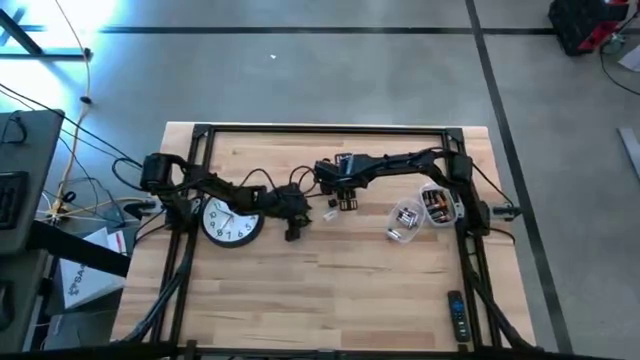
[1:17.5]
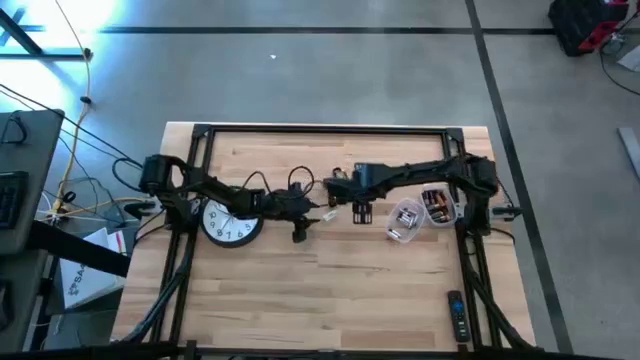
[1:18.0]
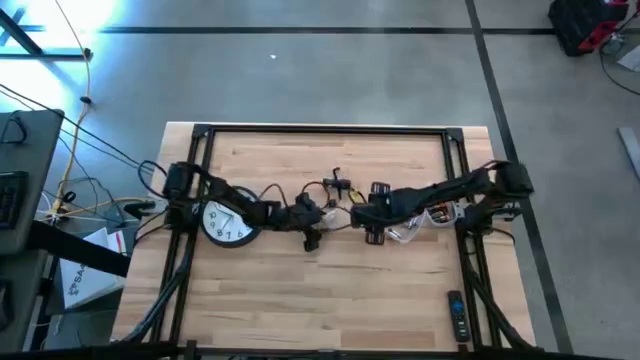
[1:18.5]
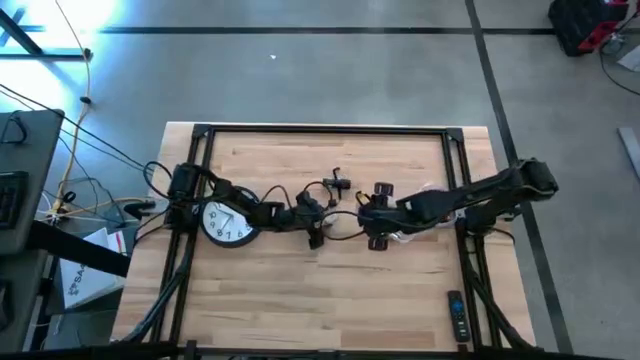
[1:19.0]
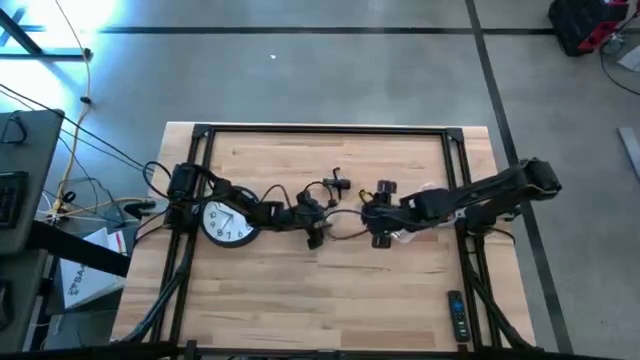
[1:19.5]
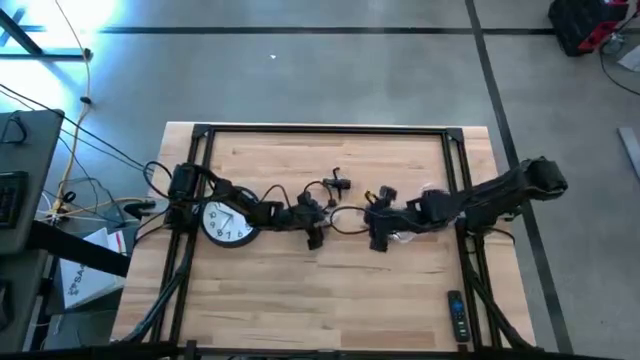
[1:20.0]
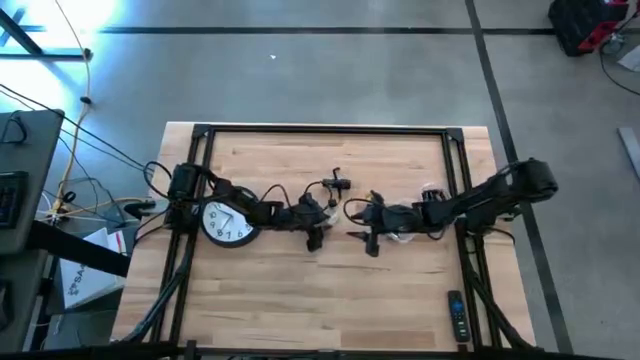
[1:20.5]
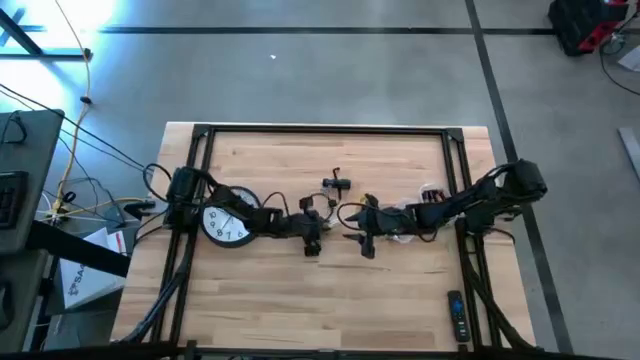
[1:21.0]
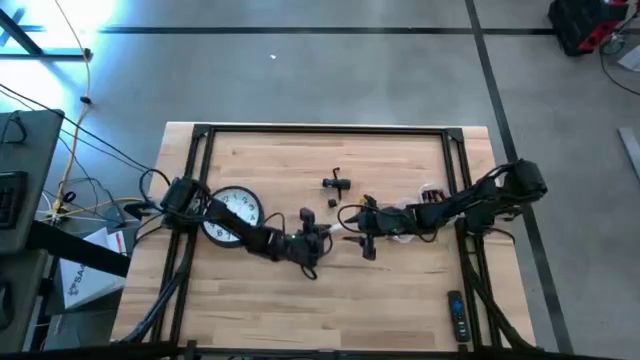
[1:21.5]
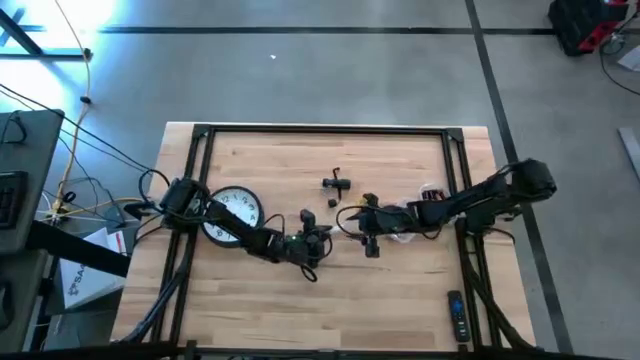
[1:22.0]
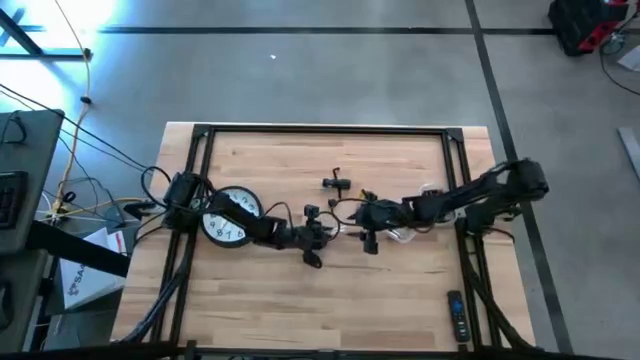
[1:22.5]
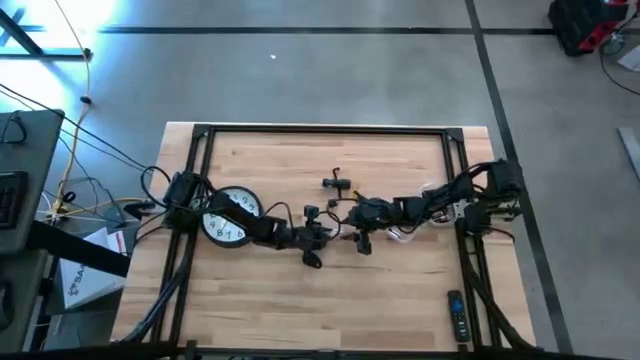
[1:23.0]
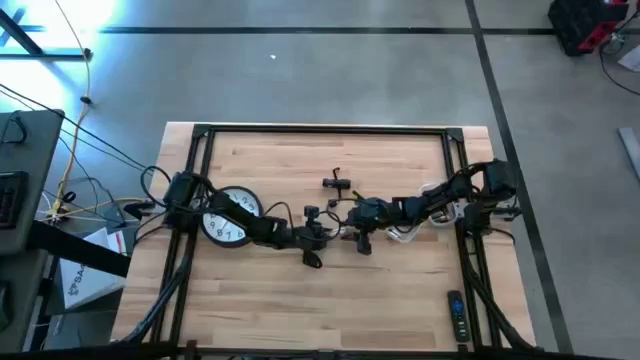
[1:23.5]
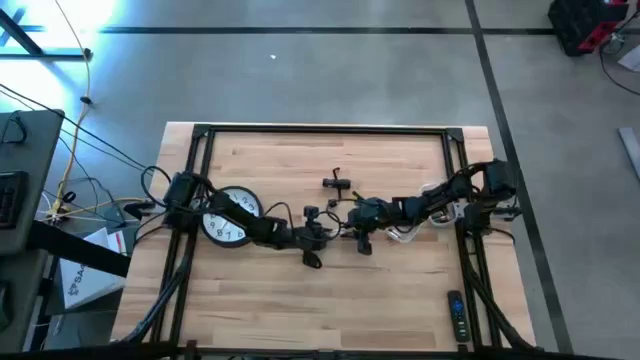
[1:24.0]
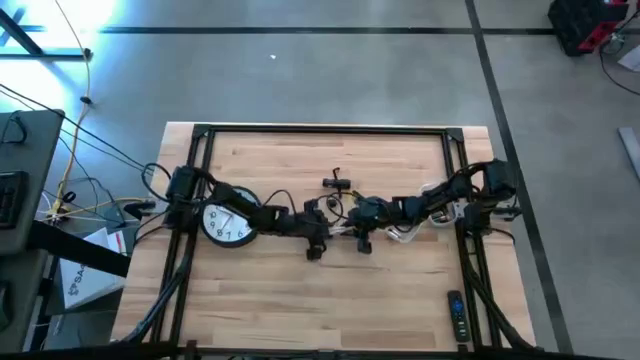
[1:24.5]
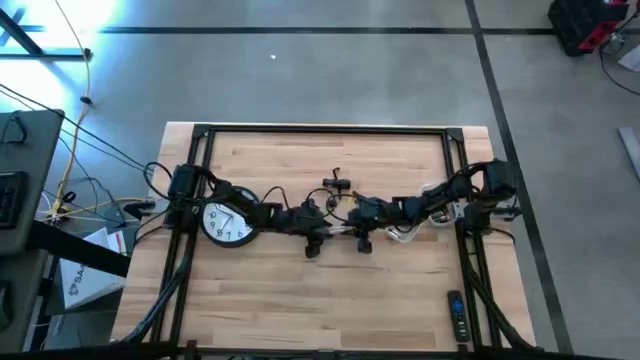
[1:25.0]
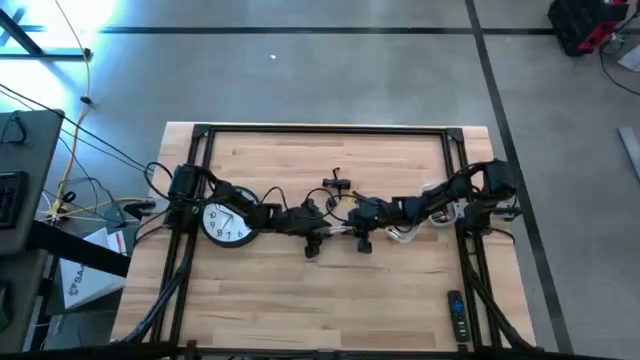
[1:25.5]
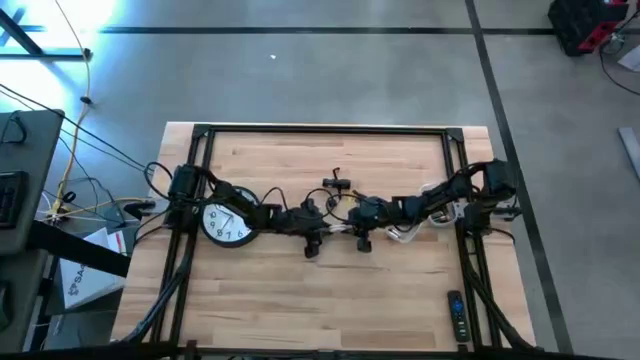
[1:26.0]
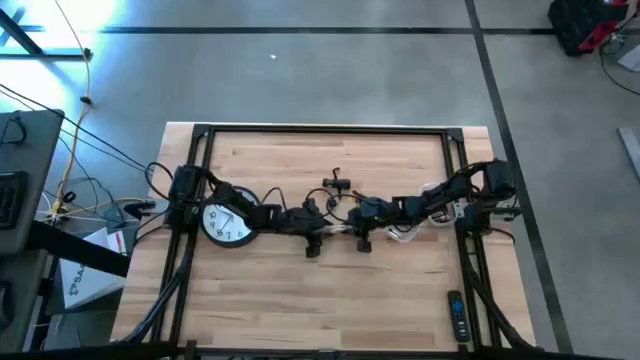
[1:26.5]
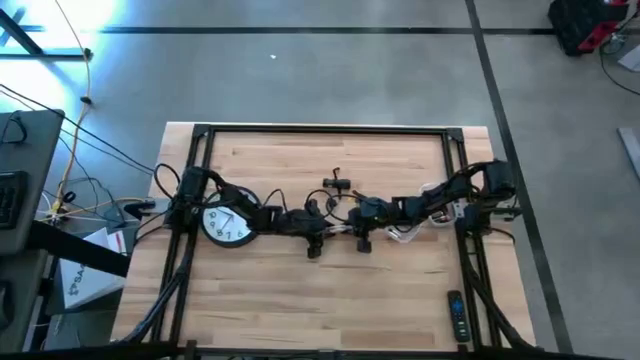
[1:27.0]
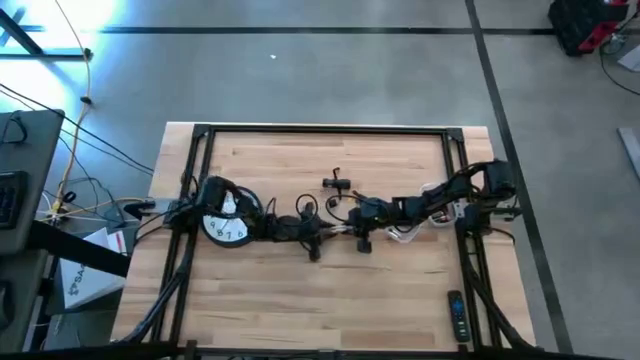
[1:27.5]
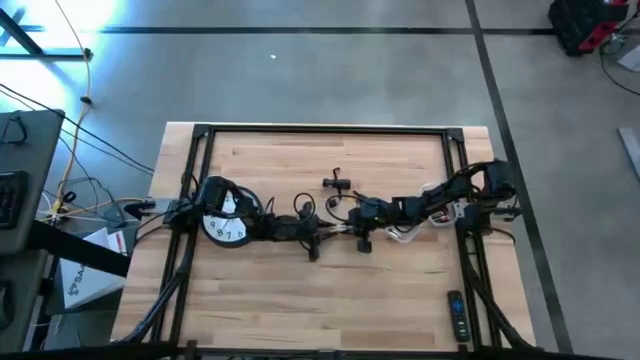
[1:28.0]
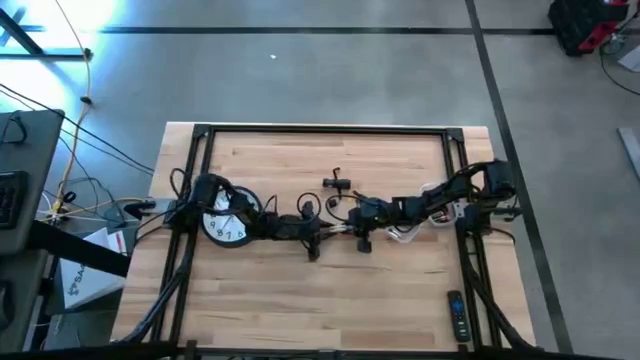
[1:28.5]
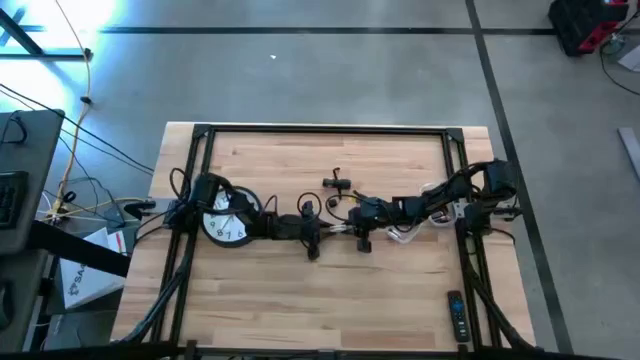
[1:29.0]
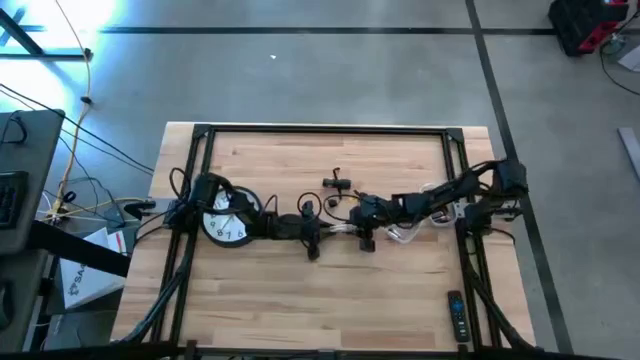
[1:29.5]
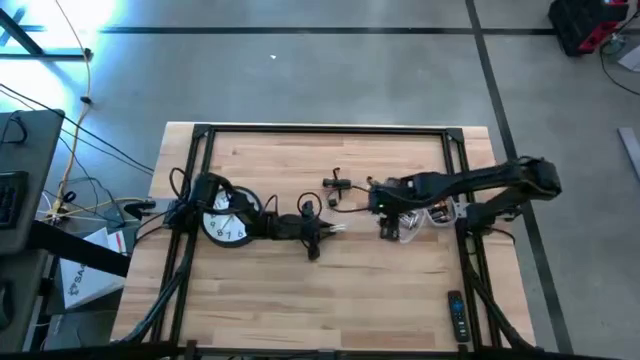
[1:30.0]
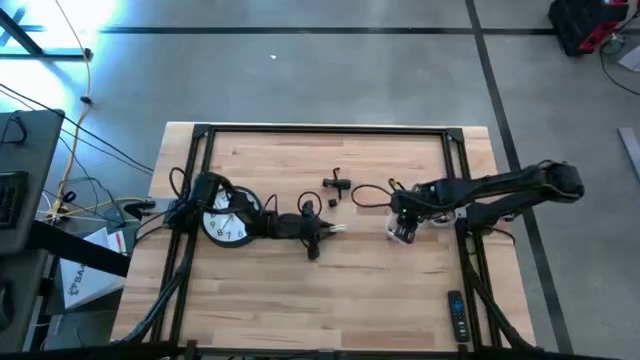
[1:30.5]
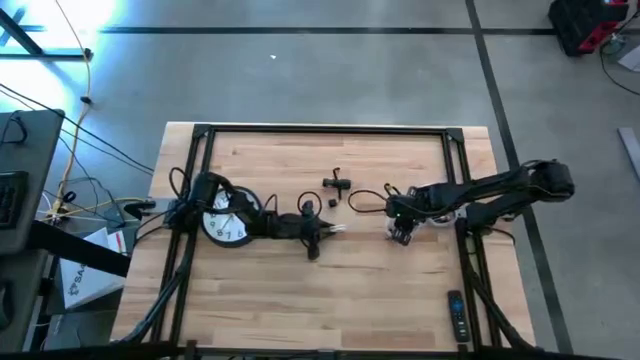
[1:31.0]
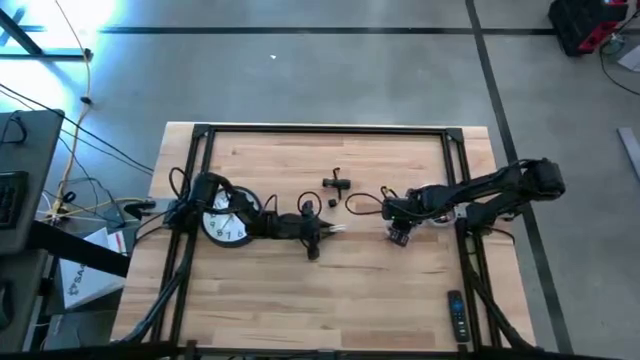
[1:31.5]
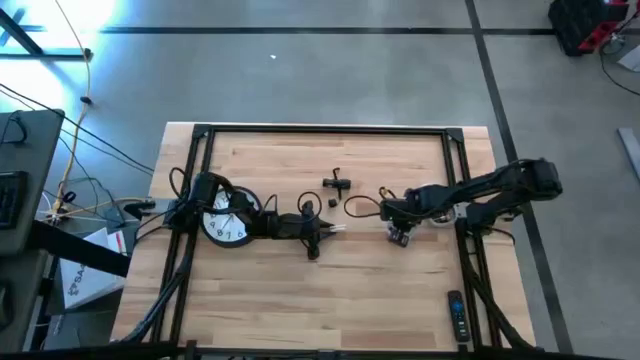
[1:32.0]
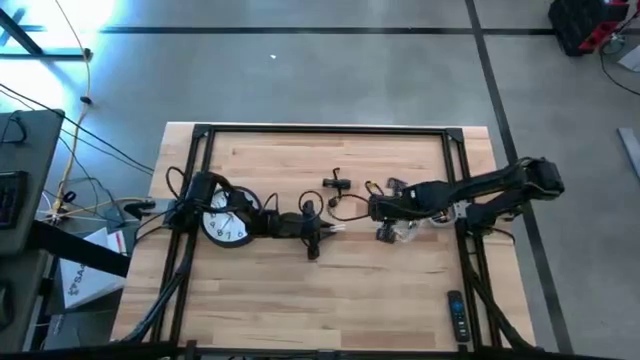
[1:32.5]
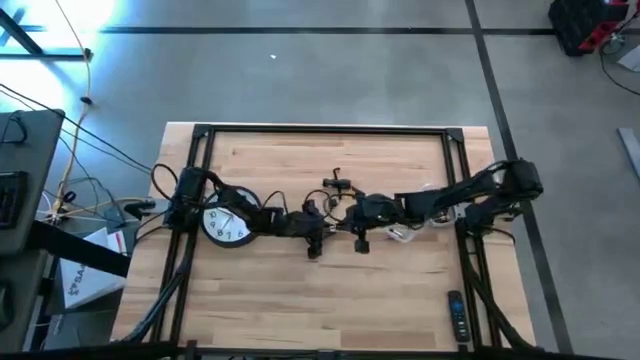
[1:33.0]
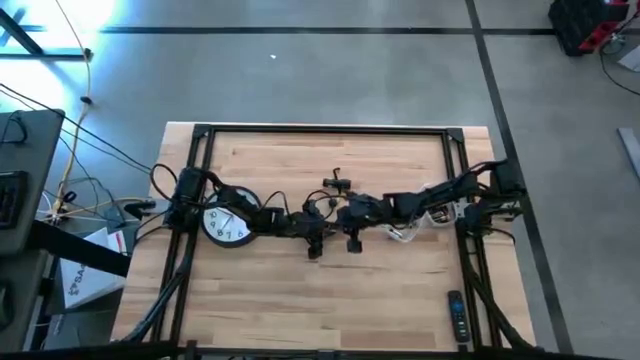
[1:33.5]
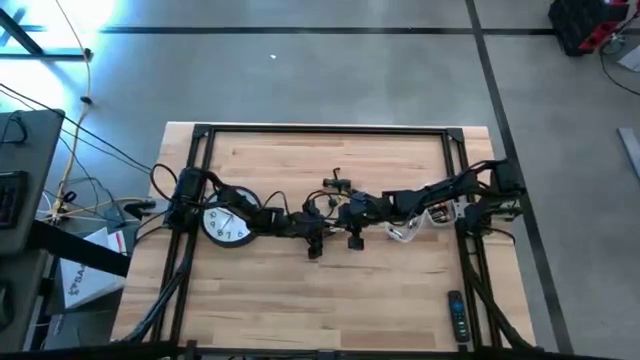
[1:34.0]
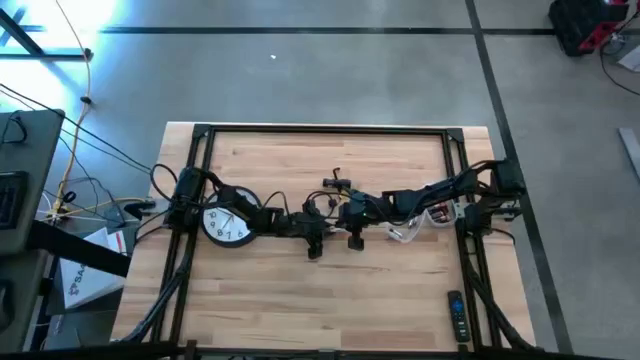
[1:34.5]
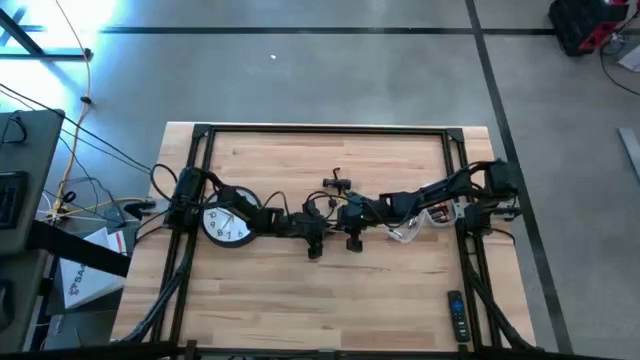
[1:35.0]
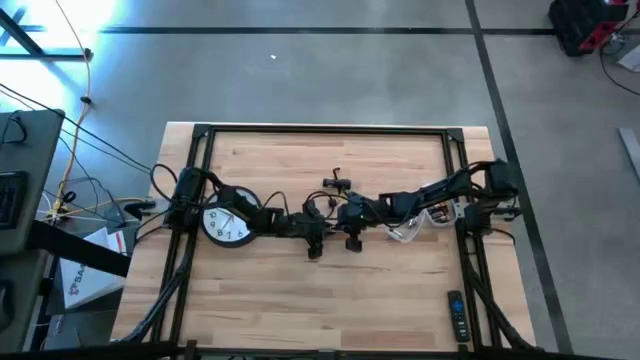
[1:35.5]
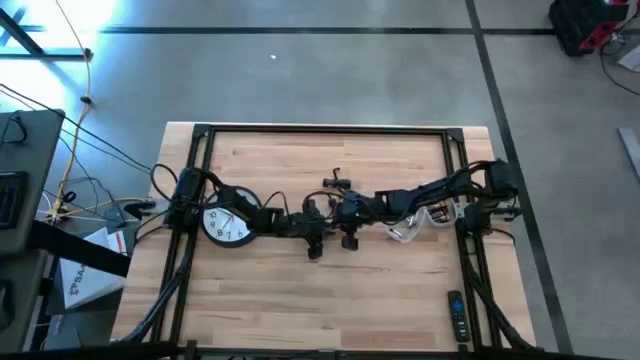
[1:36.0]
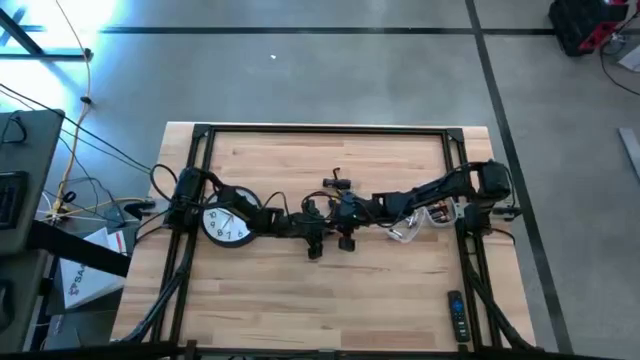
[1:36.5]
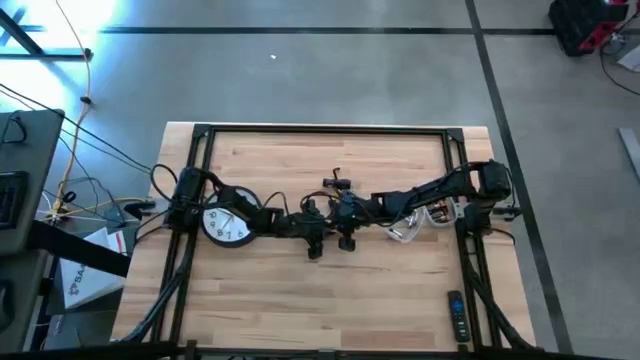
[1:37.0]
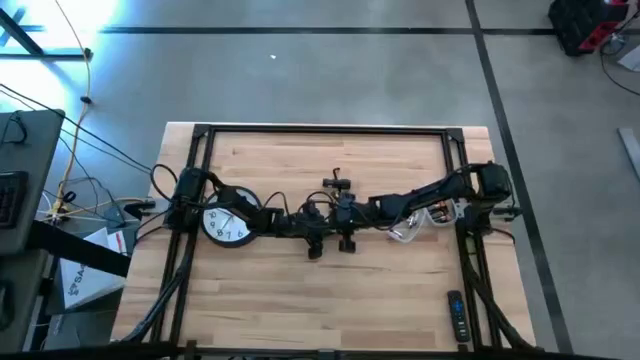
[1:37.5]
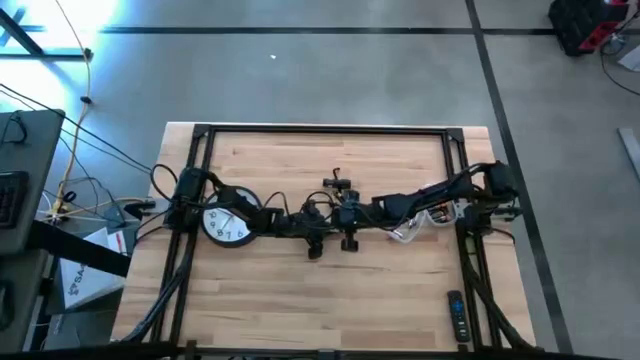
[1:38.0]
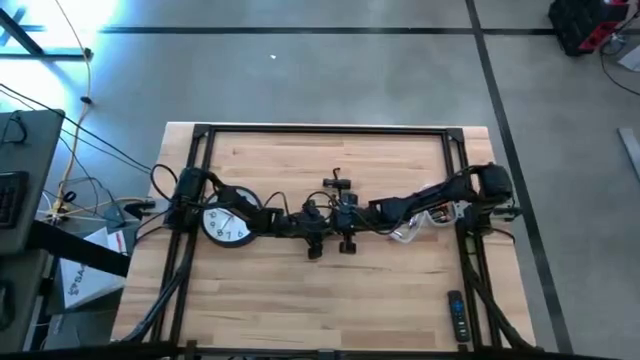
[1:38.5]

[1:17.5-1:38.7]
Task: Insert battery
Insert the silver battery into the white battery case

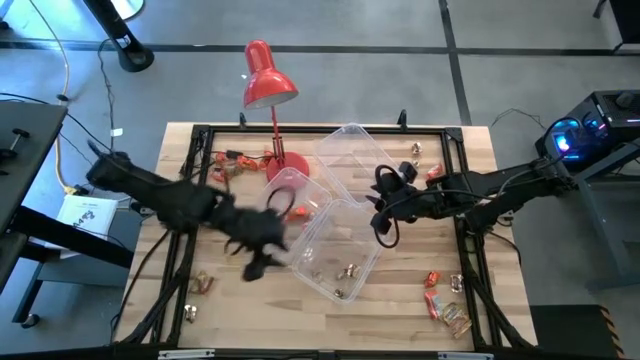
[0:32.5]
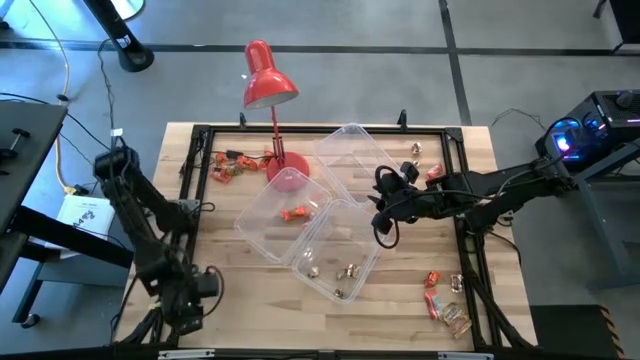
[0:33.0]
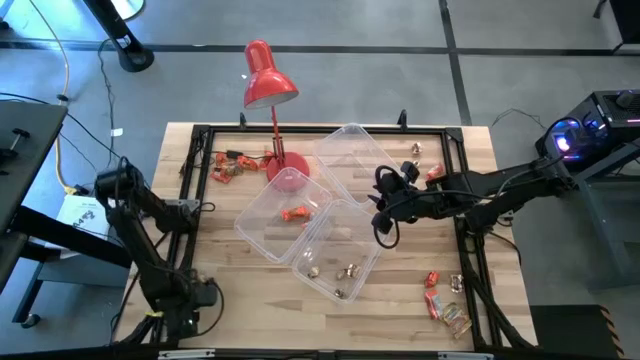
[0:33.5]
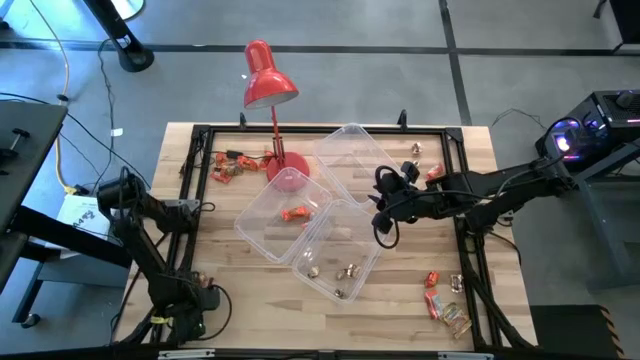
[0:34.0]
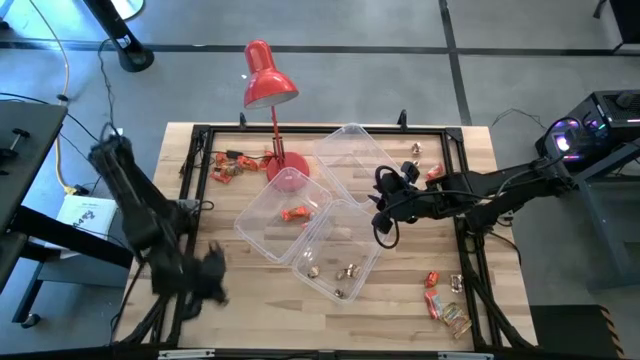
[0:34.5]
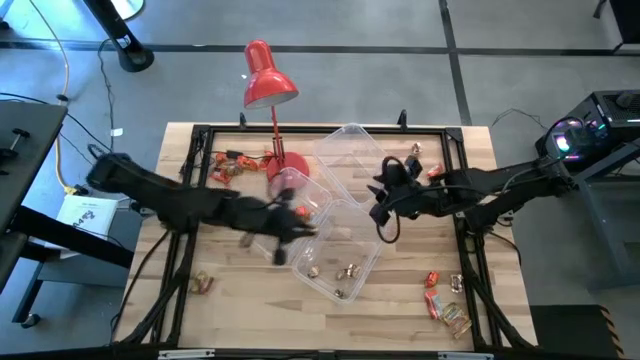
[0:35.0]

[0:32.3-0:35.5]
Task: Sort candy
Put the gold candy into the bottom left transparent bin
